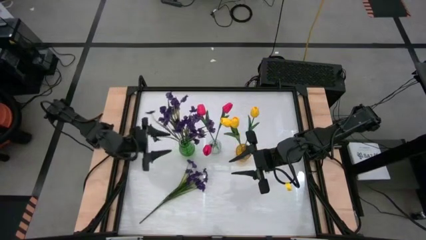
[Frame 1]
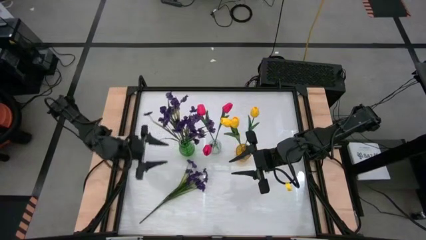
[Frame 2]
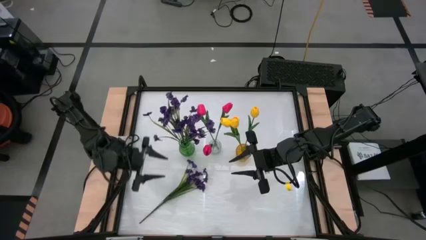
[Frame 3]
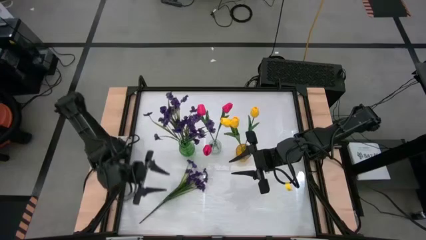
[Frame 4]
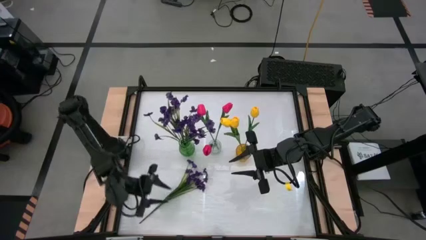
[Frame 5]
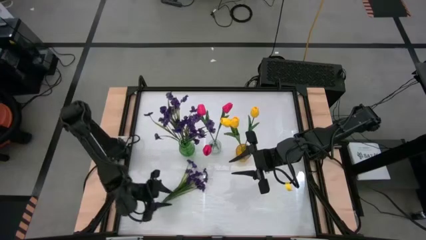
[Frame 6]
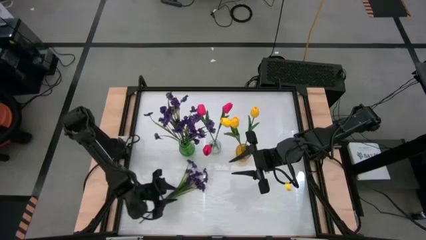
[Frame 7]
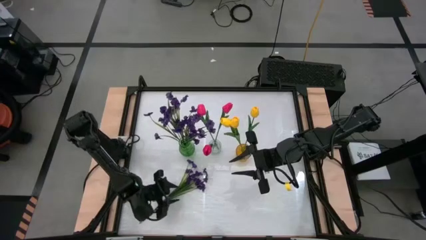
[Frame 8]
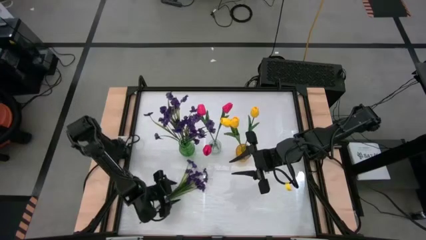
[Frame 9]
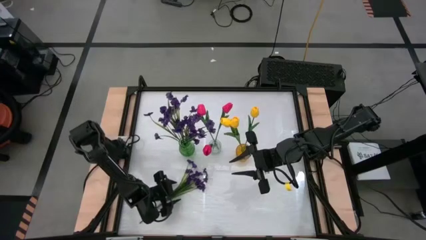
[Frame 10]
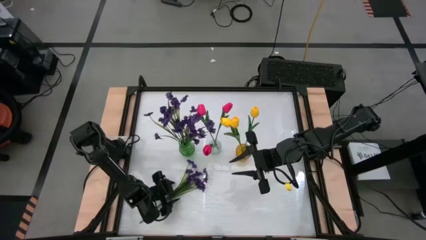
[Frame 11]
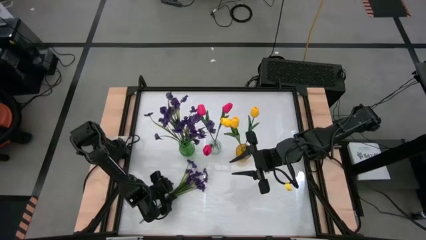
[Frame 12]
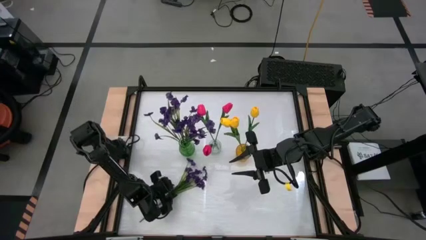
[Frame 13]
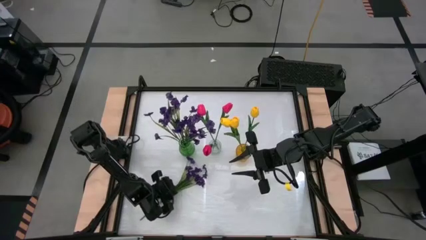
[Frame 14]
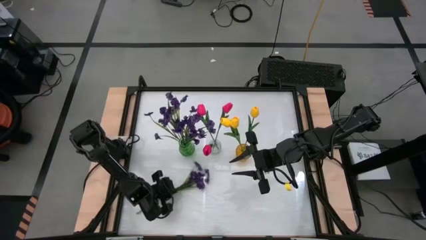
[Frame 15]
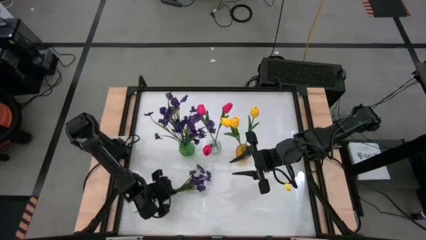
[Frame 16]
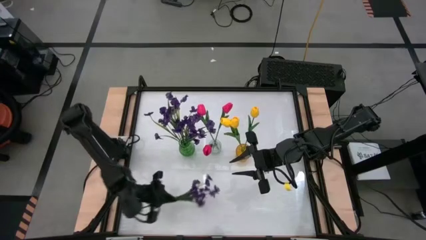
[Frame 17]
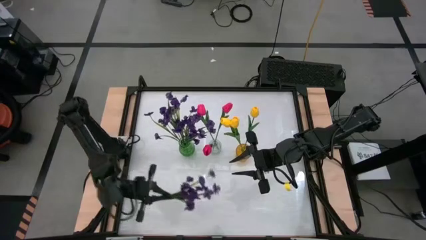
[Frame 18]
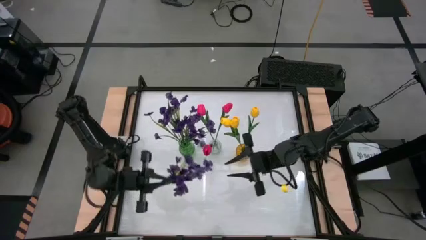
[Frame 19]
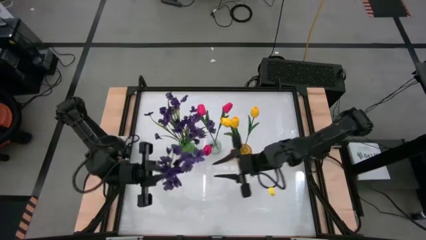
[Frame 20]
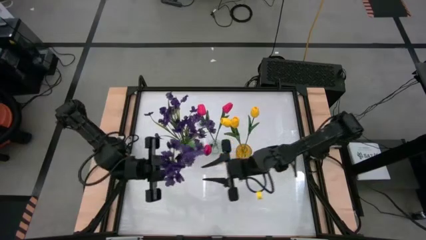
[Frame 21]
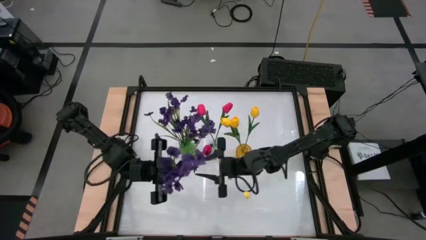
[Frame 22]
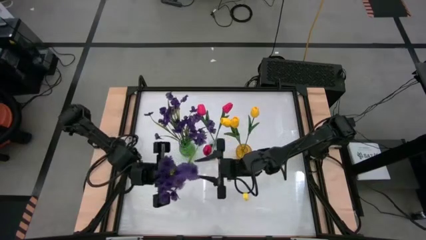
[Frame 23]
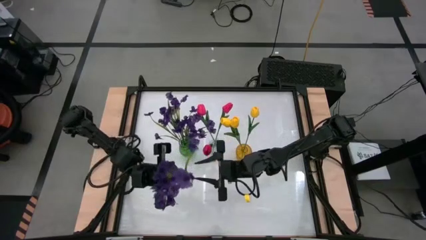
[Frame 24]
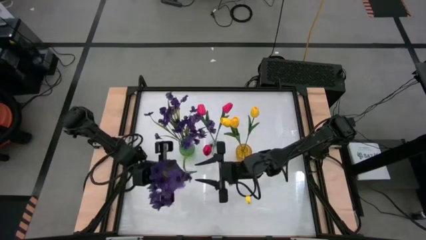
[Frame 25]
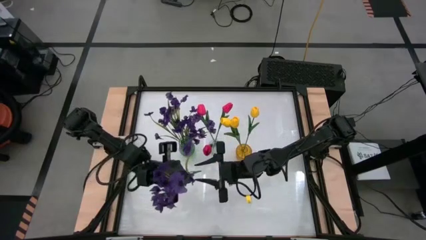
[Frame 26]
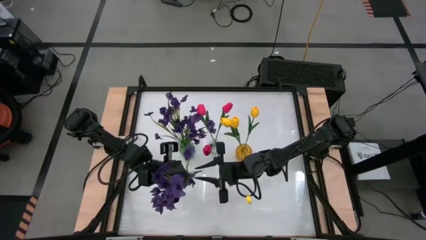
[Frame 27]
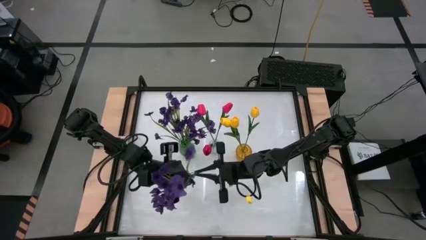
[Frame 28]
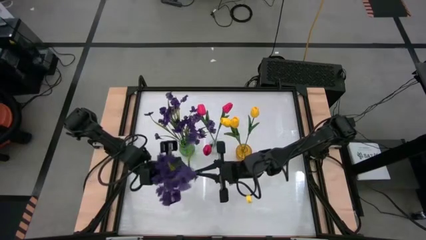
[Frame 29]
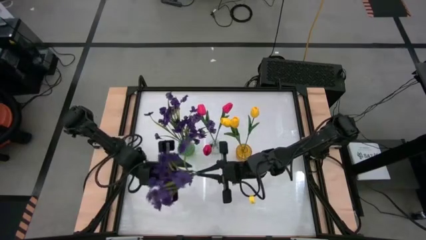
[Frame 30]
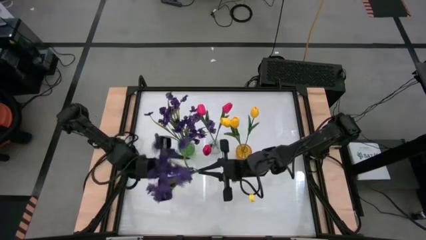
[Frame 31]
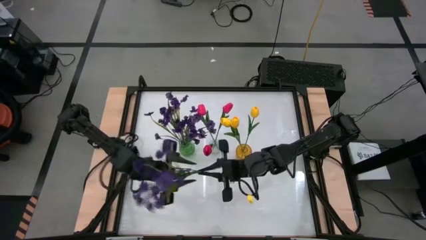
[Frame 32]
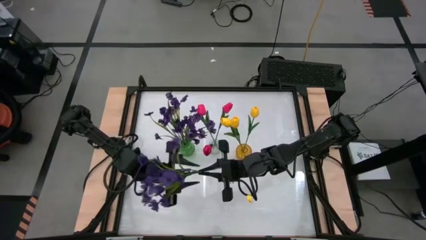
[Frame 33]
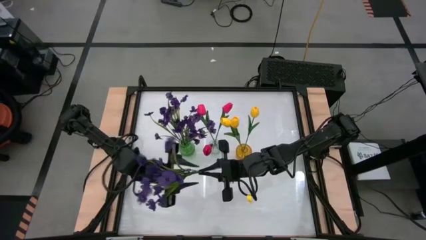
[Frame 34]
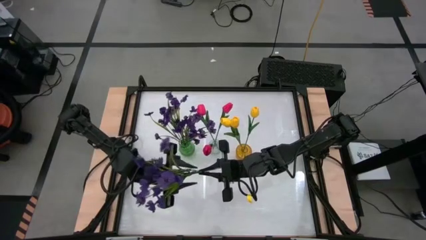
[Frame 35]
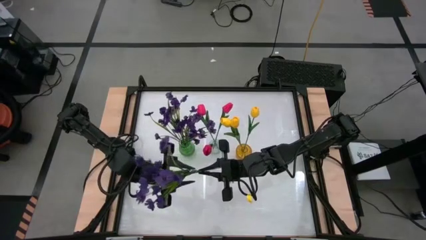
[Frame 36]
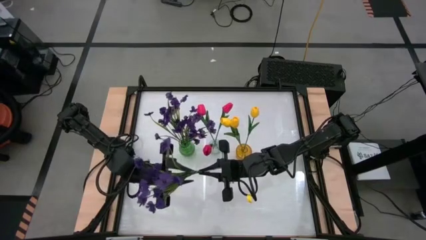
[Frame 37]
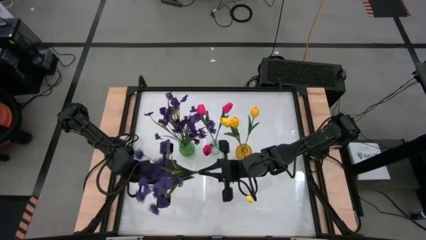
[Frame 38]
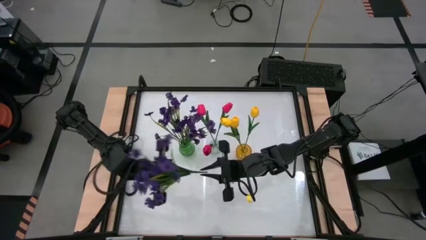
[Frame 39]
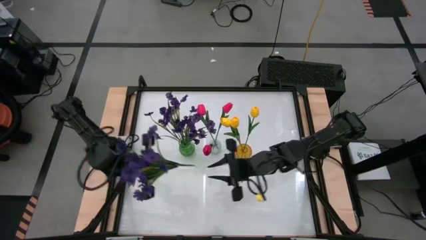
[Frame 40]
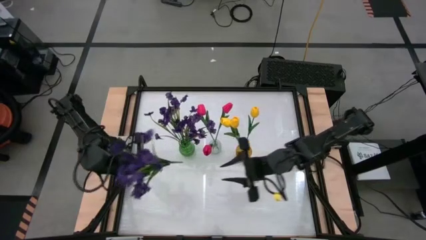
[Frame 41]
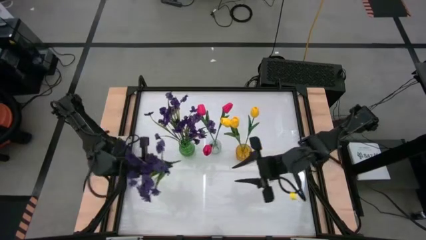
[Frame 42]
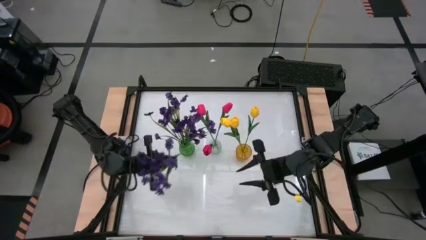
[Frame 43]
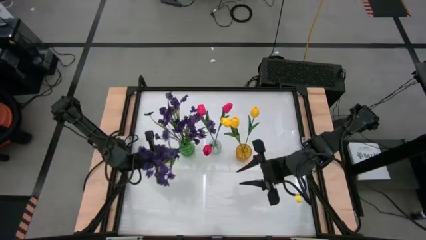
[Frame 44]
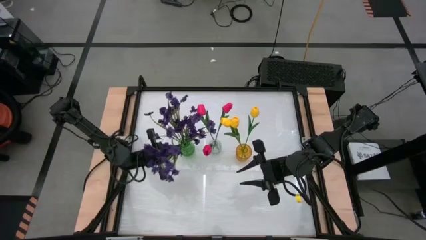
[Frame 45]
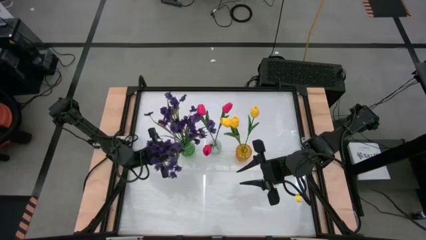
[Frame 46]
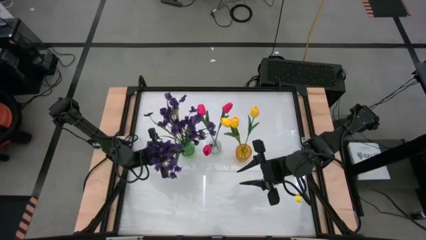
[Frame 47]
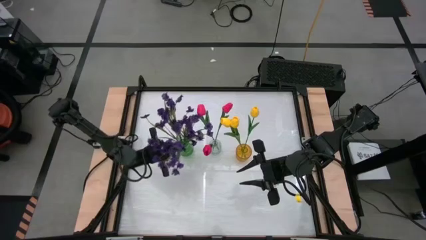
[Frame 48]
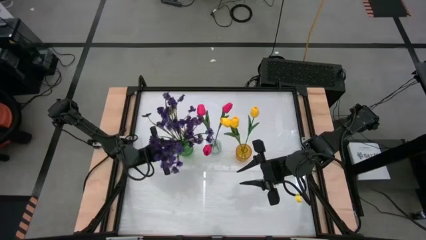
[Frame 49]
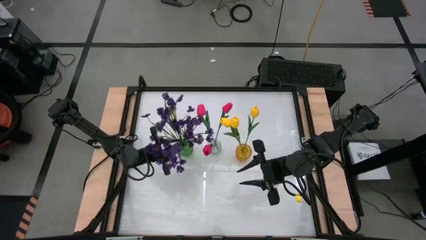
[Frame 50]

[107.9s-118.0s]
Task: Sort flowers into vase by color
Put the purple flowers into the green vase

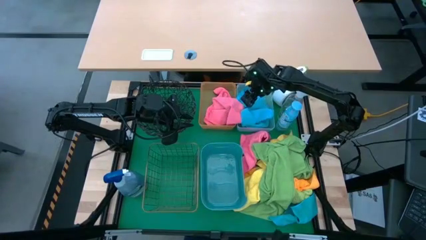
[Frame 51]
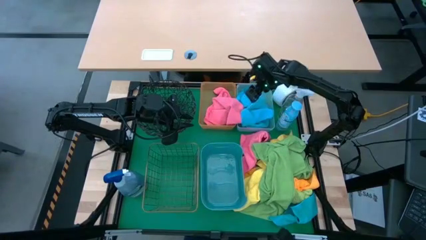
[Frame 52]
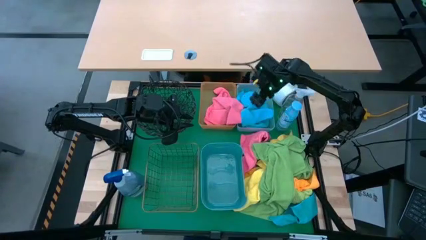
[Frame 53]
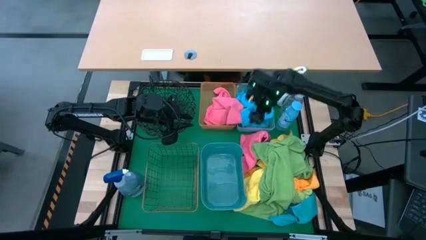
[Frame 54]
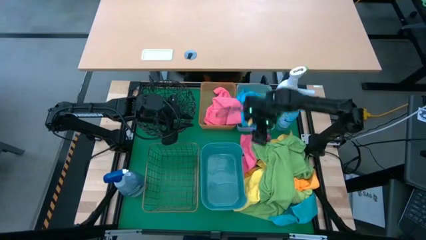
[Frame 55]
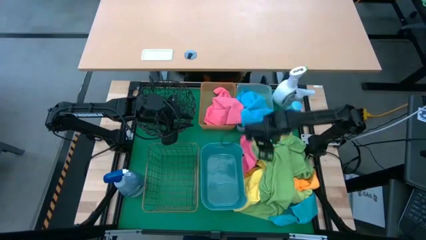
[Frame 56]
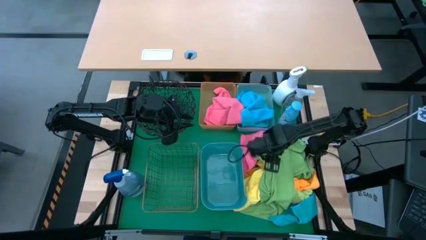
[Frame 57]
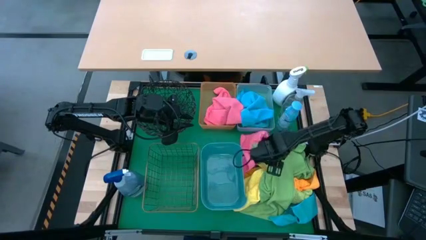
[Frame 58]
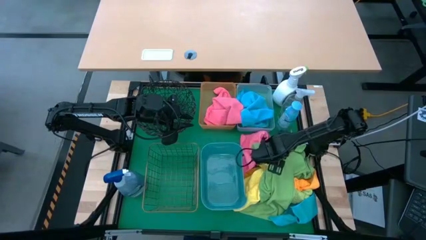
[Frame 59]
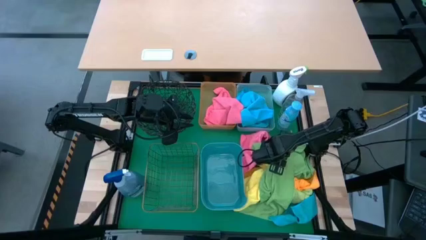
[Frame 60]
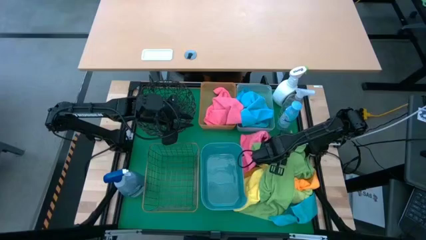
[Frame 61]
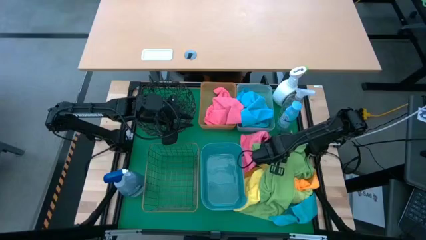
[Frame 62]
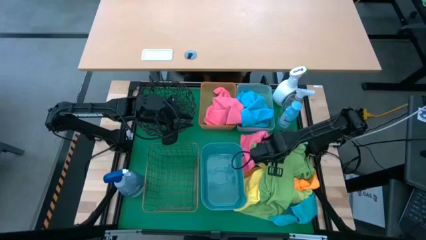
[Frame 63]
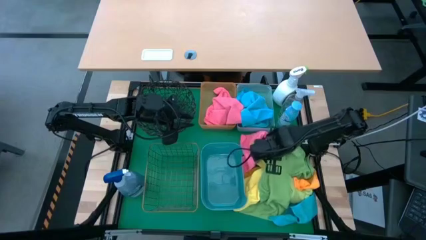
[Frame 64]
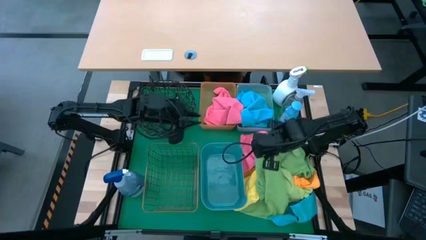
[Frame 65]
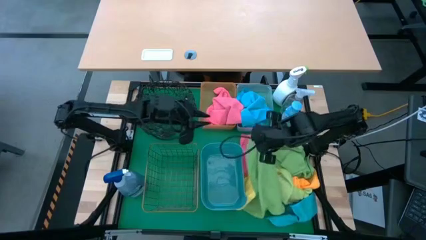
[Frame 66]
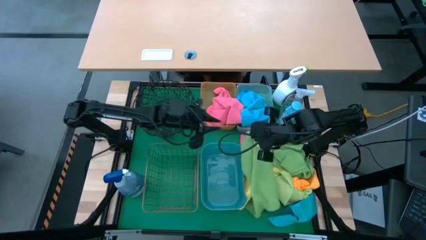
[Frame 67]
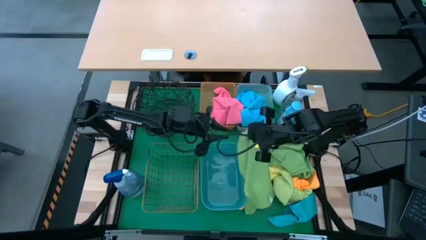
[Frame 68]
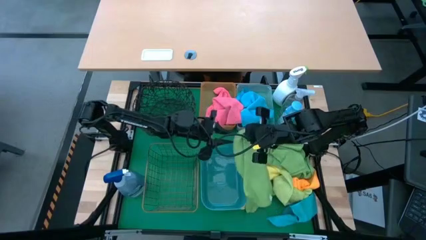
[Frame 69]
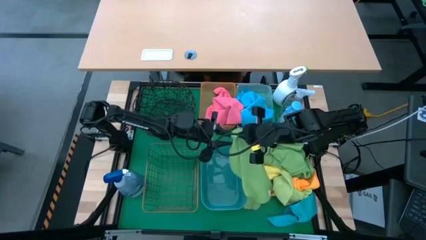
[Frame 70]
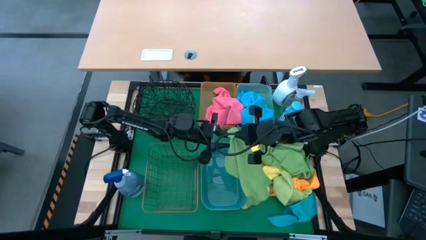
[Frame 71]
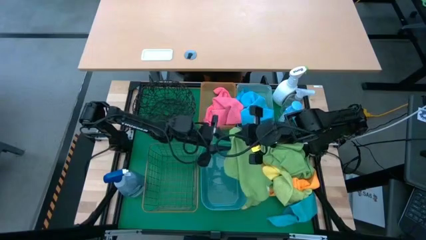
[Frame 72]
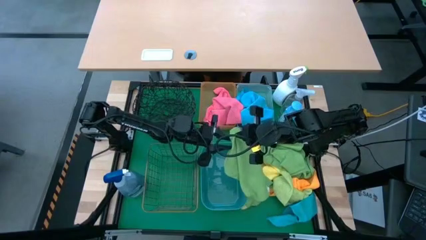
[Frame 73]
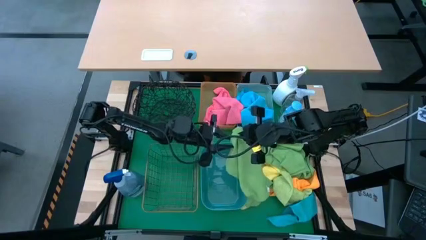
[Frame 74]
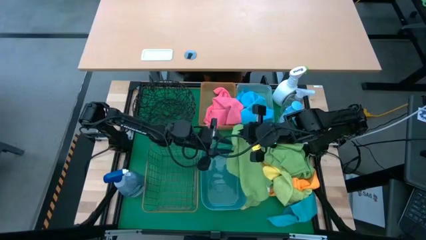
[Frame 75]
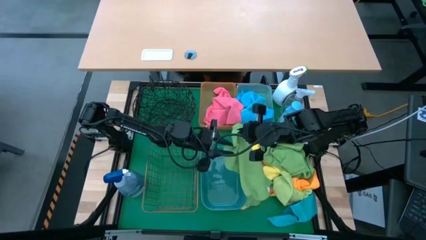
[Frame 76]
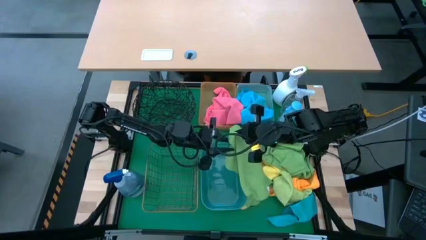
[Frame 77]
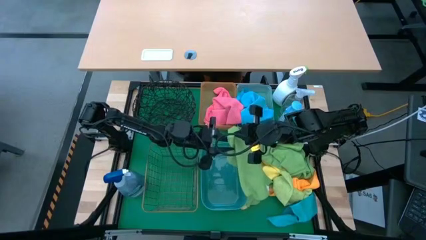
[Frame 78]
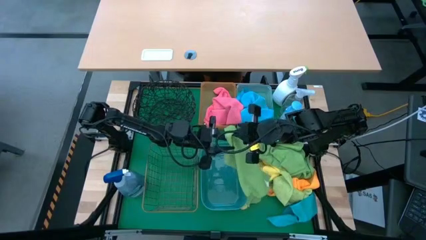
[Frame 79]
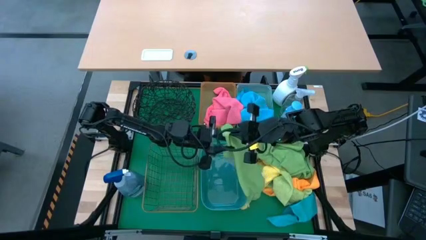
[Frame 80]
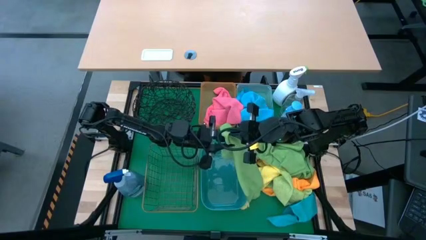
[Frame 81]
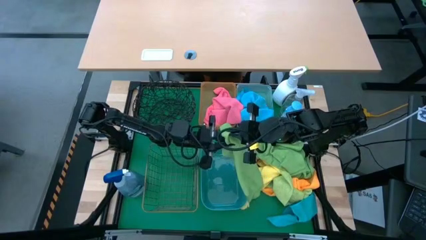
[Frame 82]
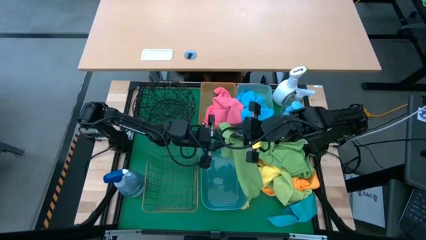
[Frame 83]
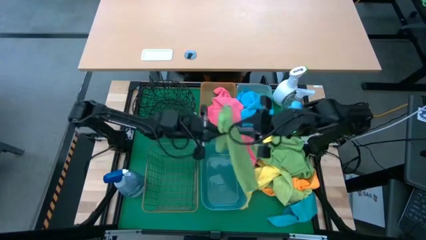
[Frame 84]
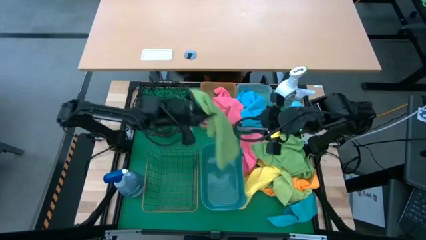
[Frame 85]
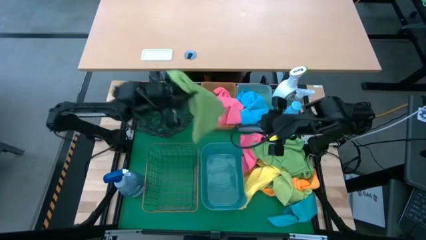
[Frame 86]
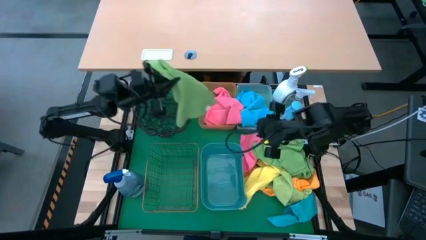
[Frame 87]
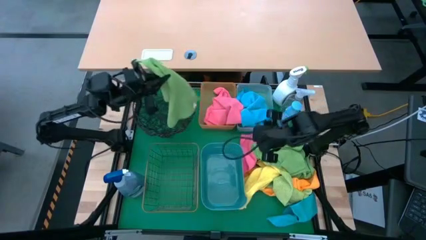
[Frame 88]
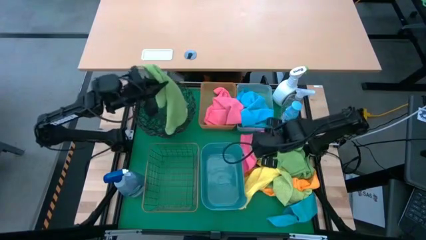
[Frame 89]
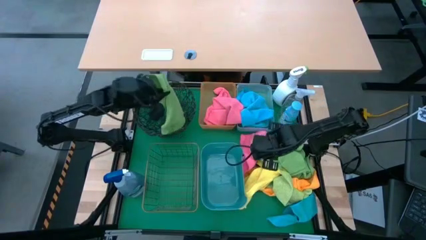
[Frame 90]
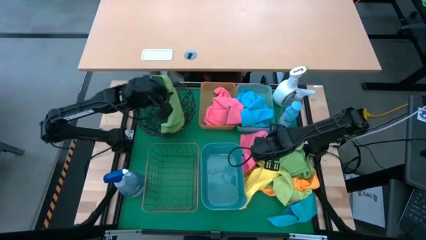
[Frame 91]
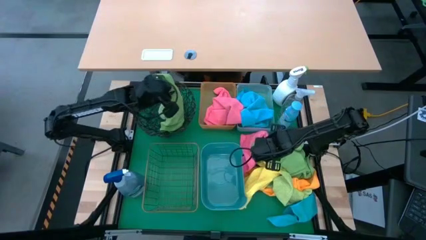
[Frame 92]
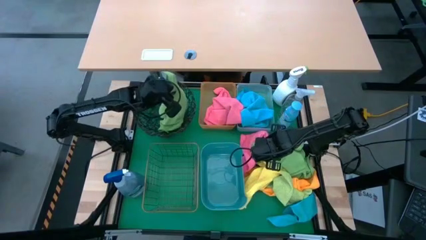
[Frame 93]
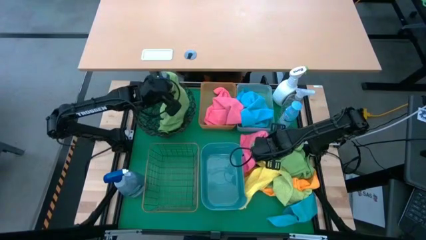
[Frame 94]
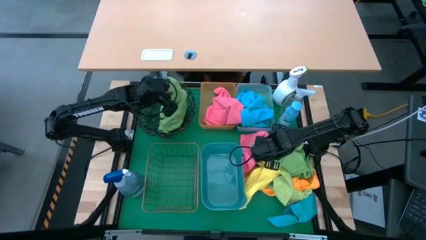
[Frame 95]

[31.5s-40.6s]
Task: Sort microfiber towel by color & place in baskets
Put the green towel into the black basket
